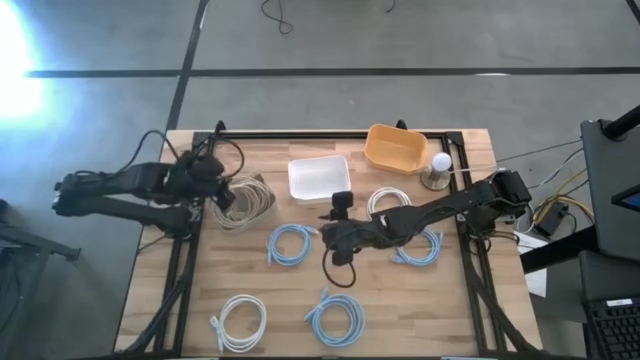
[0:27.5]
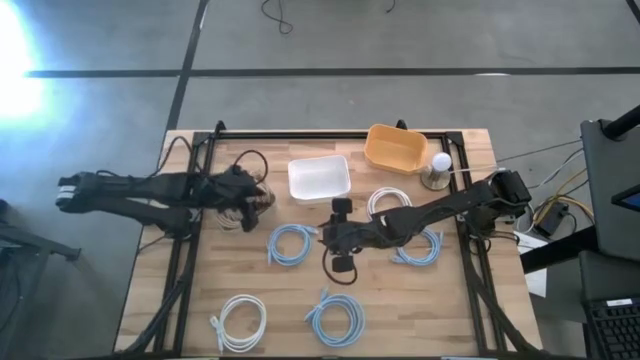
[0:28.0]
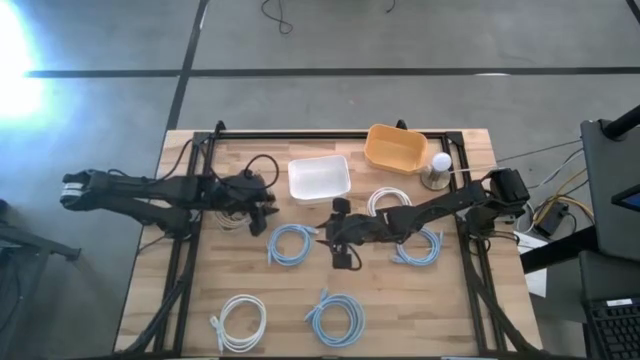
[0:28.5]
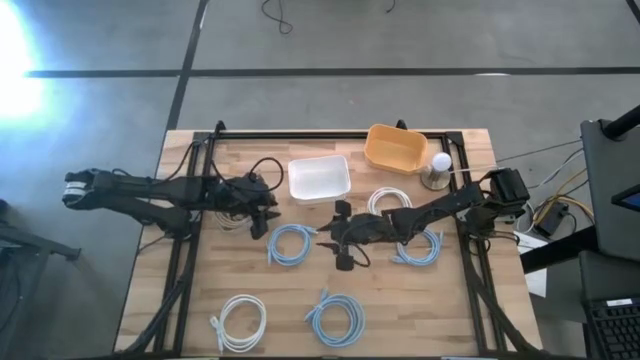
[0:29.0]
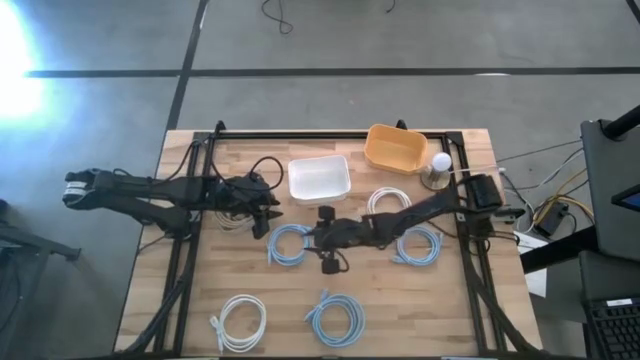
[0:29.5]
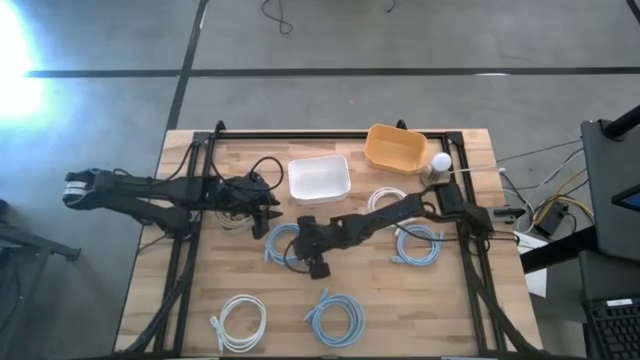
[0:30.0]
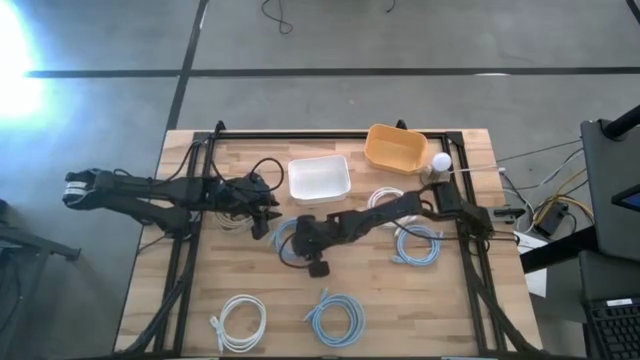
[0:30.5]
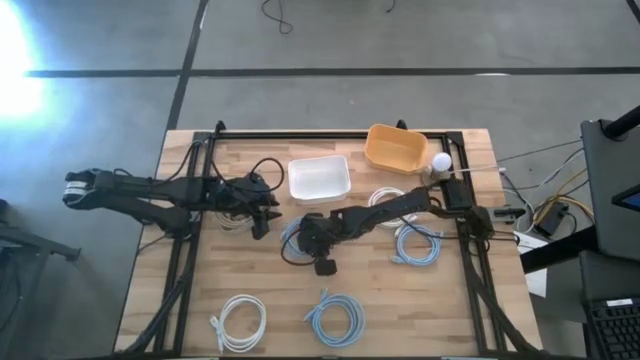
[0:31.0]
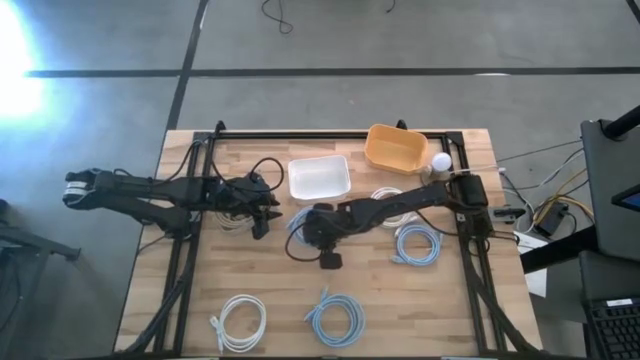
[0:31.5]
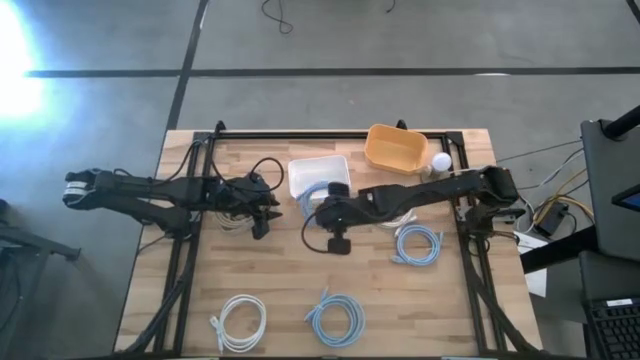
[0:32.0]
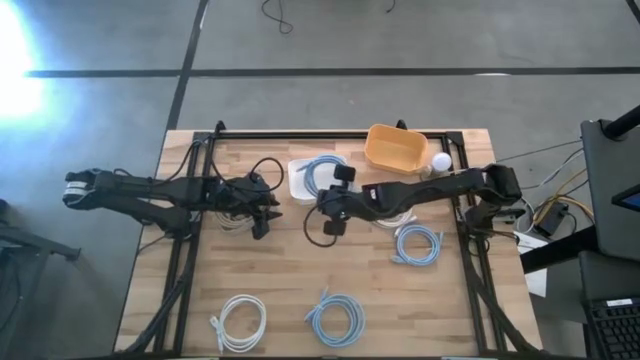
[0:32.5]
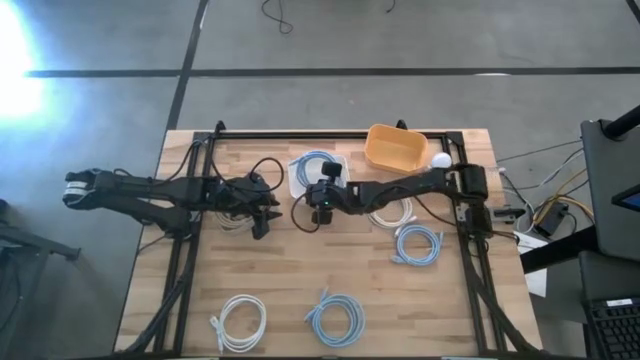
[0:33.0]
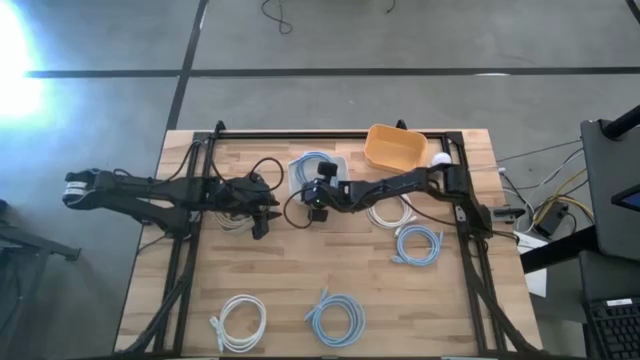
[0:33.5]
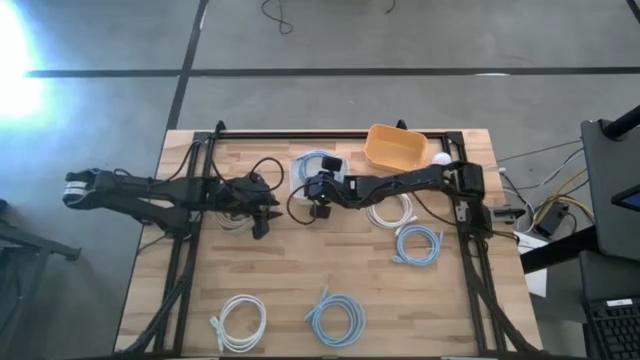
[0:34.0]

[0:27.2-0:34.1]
Task: Sort HDMI cables
Put the top left blue HDMI cable into the white bin

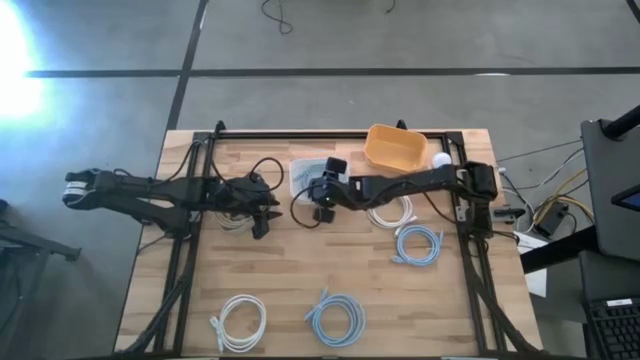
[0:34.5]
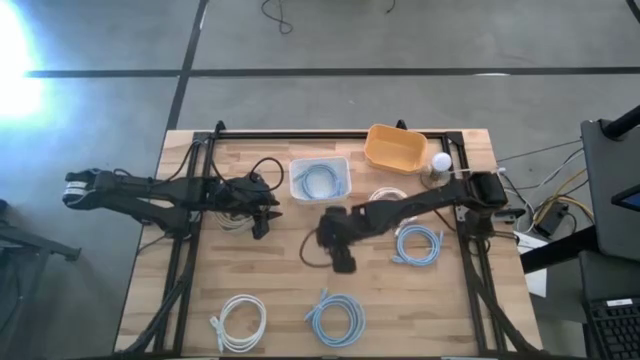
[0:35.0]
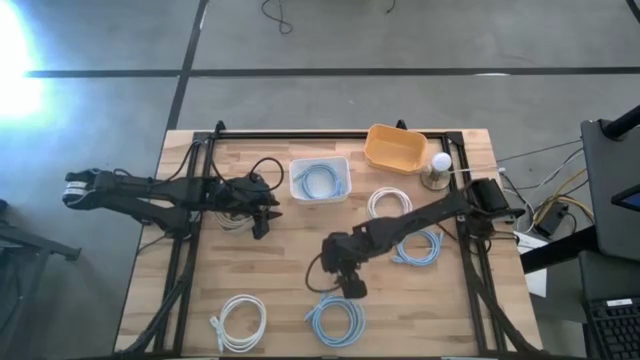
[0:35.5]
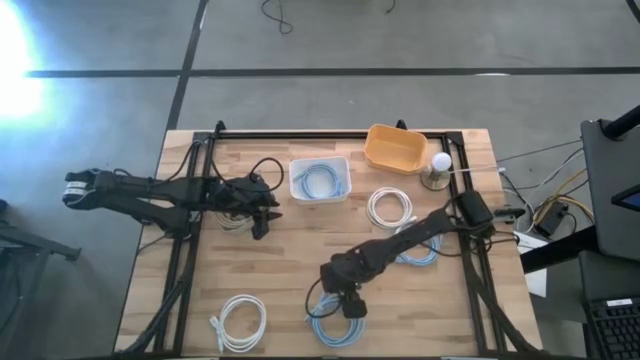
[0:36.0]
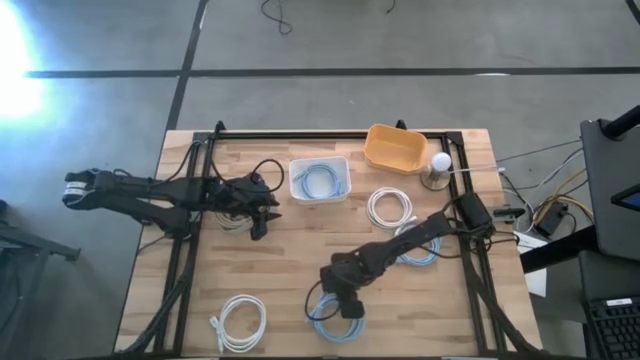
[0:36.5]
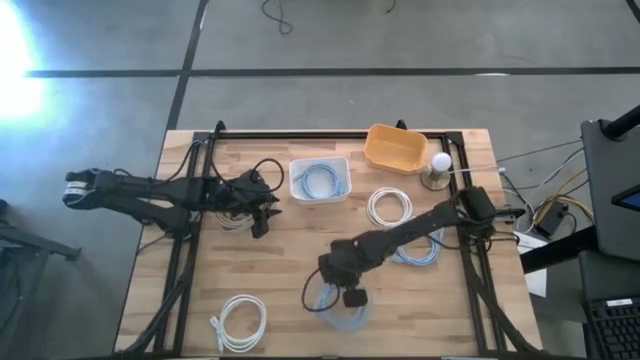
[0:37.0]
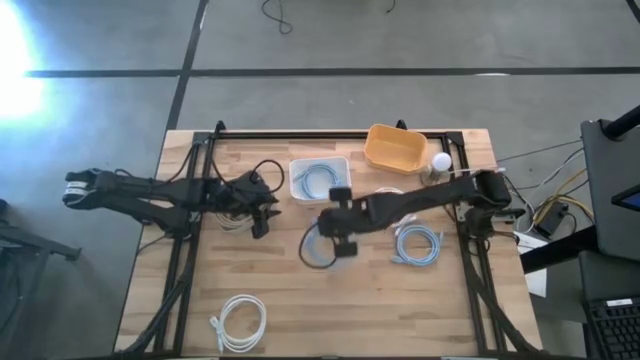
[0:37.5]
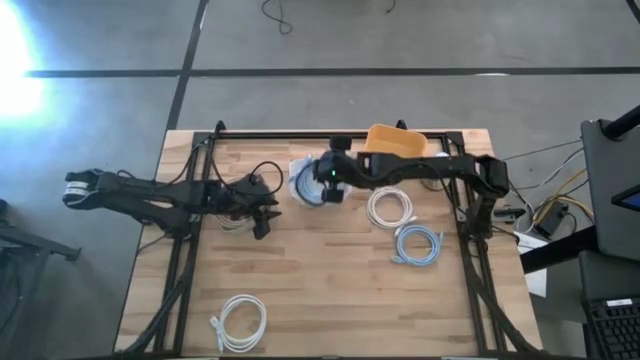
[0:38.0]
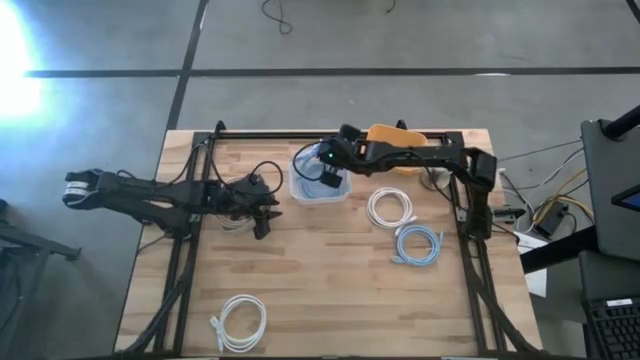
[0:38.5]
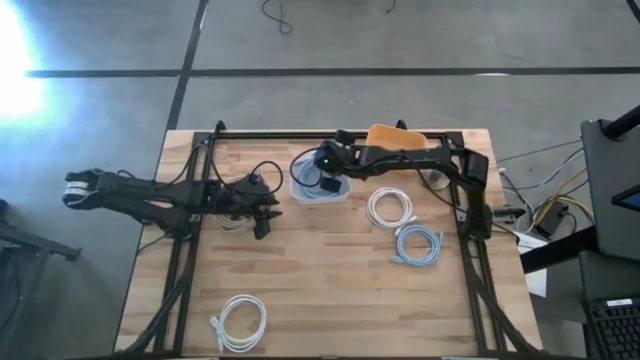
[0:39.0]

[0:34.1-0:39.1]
Put the bottom blue HDMI cable into the white bin

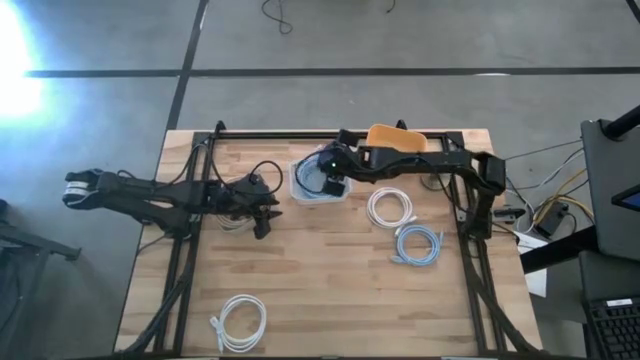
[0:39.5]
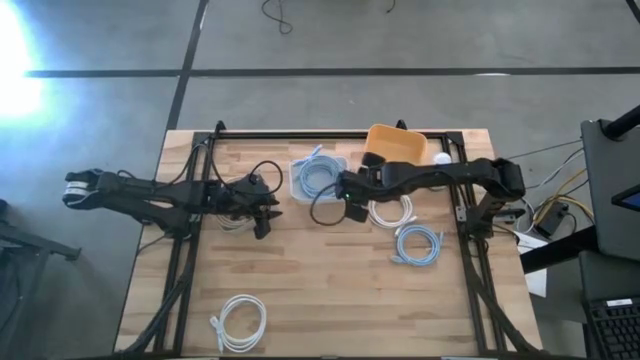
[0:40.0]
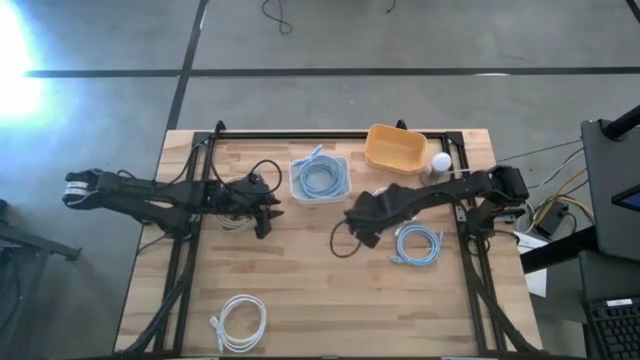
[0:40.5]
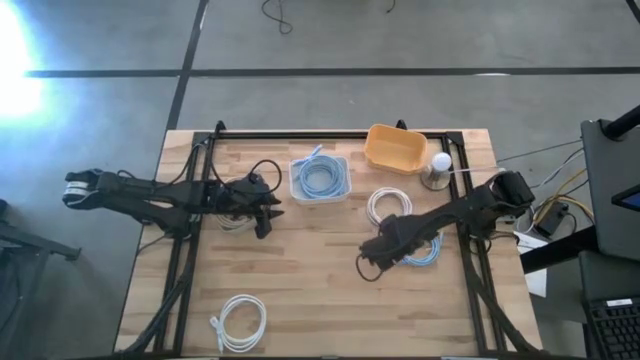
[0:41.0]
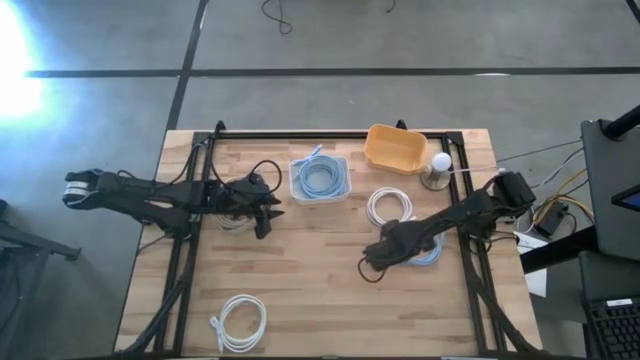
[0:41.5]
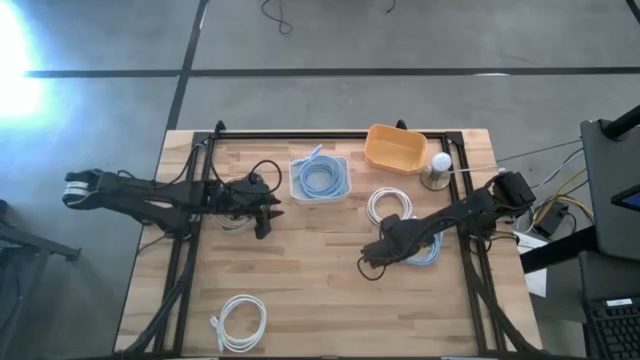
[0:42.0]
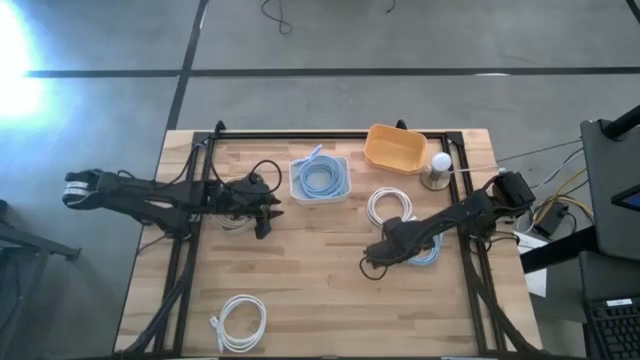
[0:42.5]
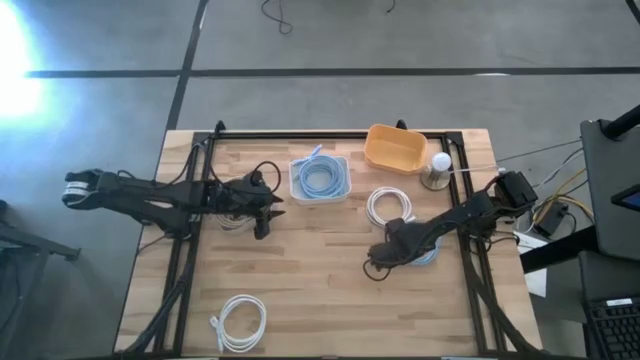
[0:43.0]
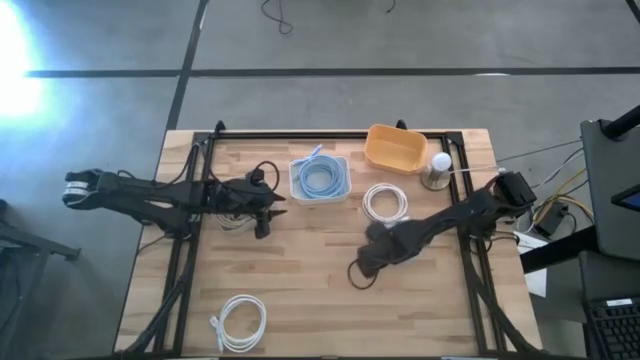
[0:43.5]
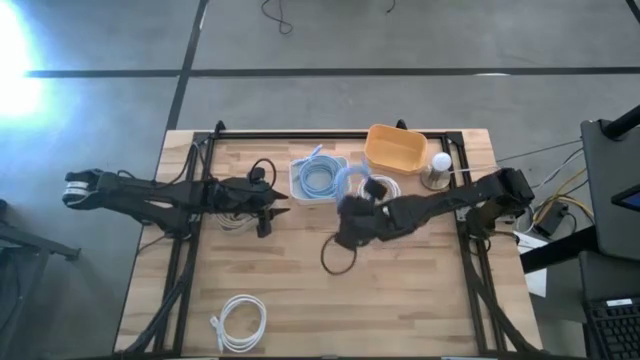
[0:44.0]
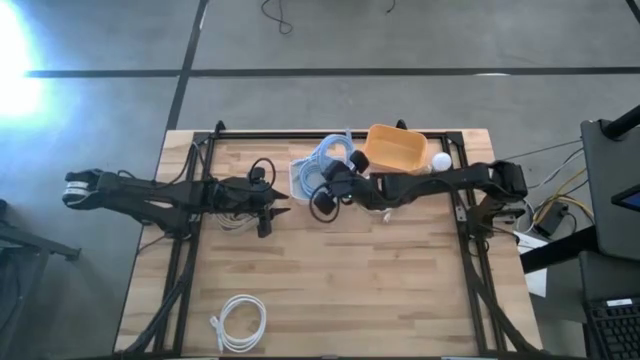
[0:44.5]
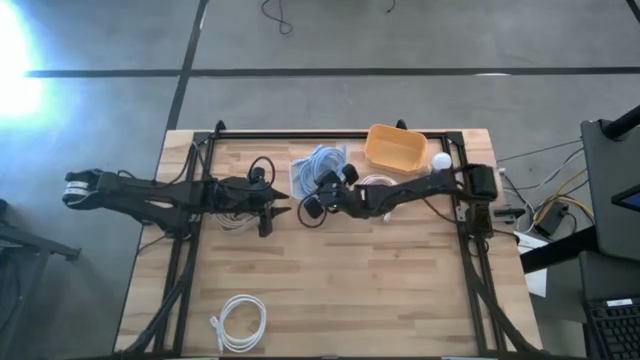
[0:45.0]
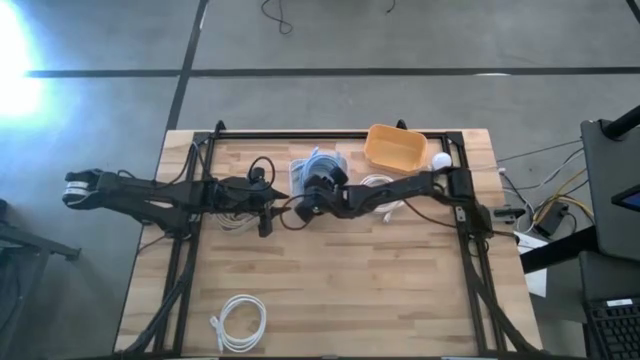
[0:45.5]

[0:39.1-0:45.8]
Put the blue HDMI cable into the white bin

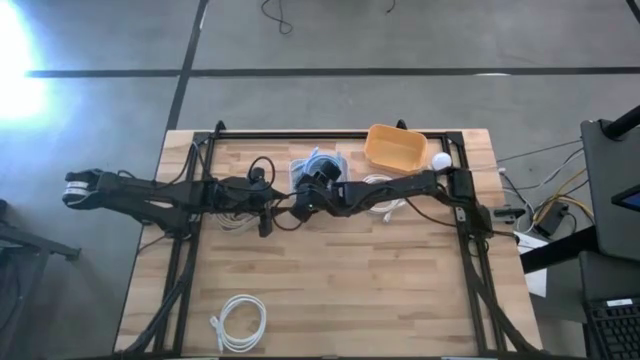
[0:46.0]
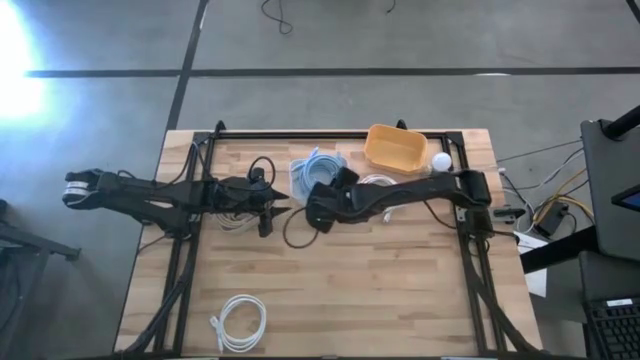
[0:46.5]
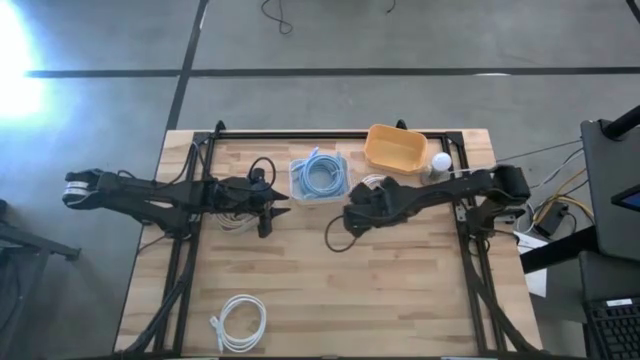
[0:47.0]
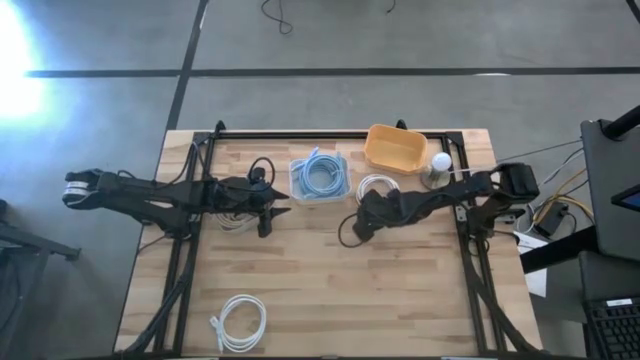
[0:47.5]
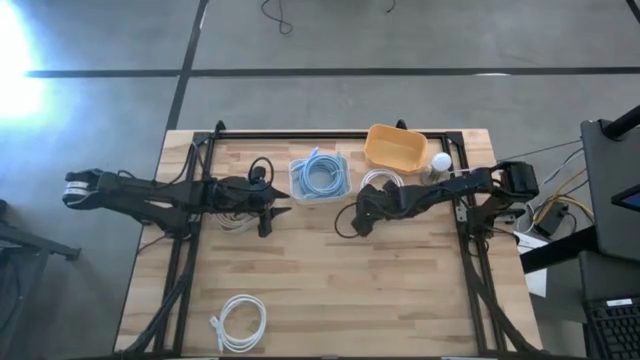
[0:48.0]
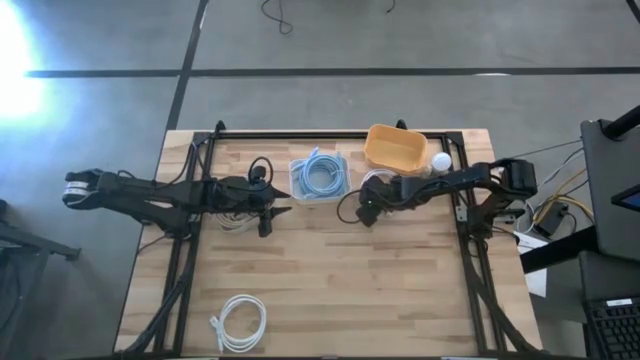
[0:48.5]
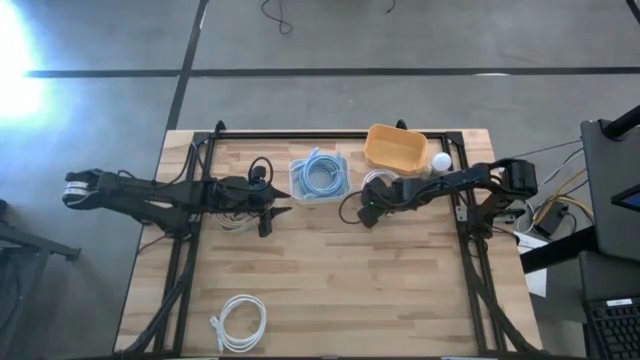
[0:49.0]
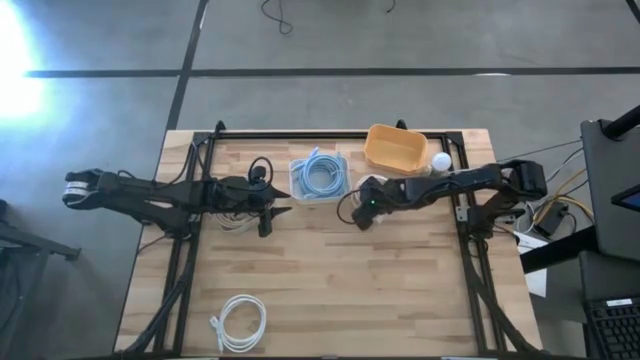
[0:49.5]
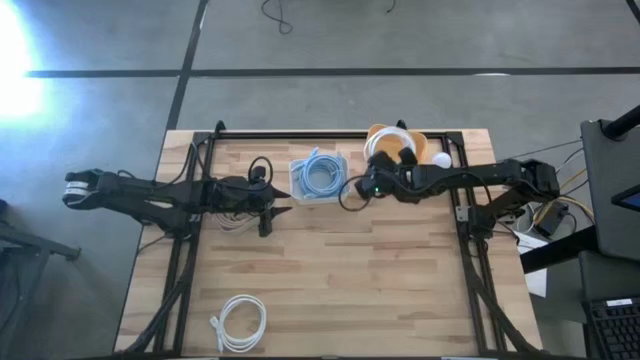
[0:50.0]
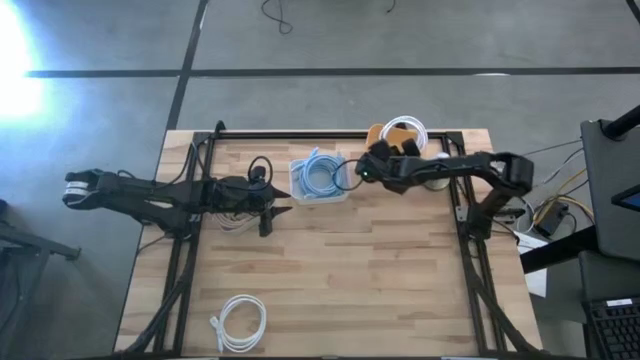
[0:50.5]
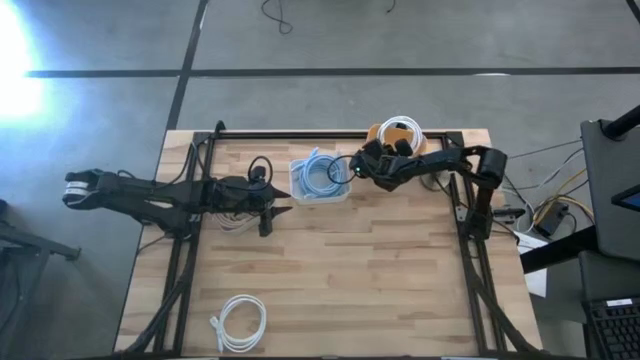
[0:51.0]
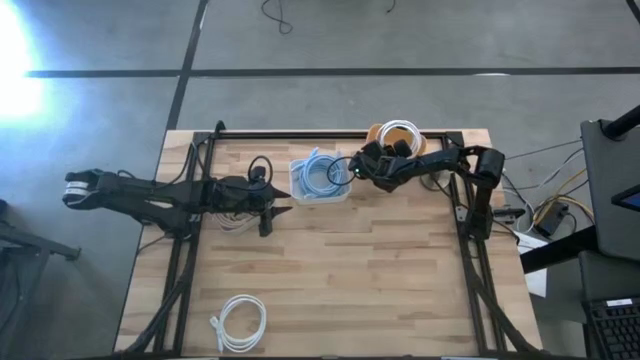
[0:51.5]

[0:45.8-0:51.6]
Put the top white HDMI cable into the yellow bin
